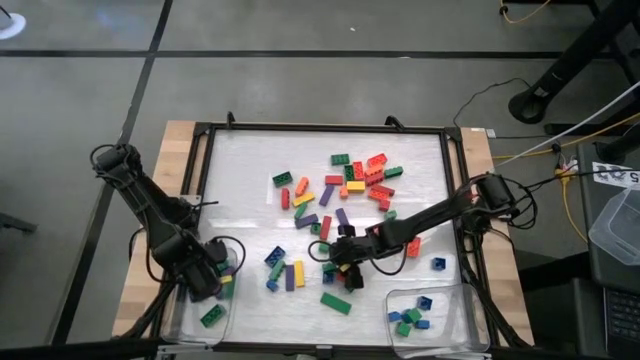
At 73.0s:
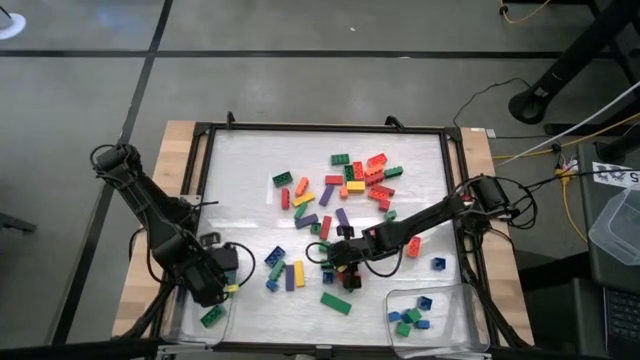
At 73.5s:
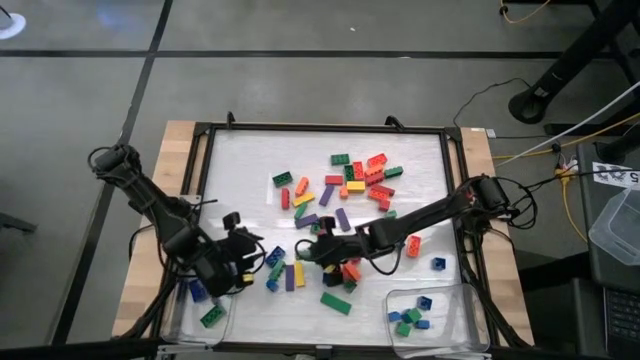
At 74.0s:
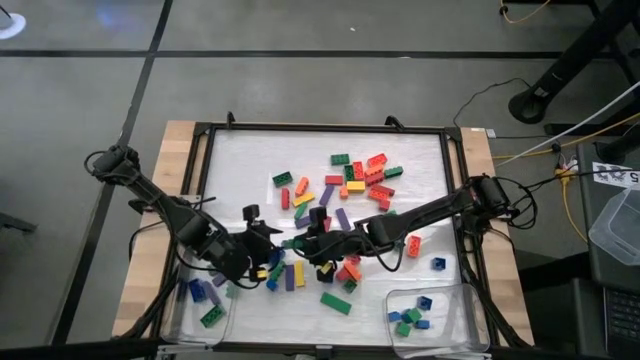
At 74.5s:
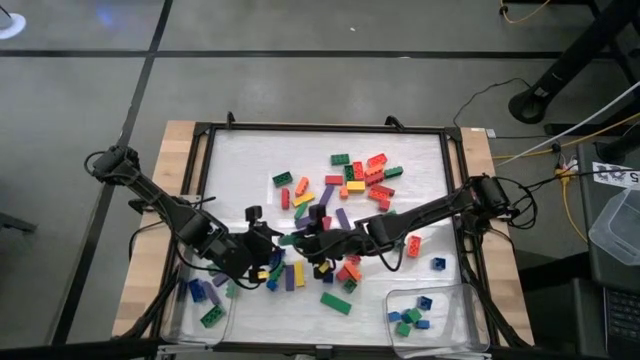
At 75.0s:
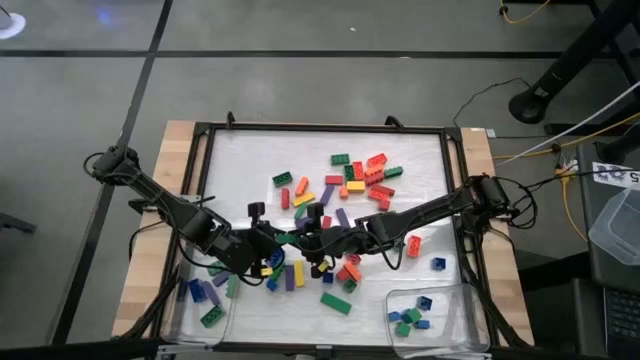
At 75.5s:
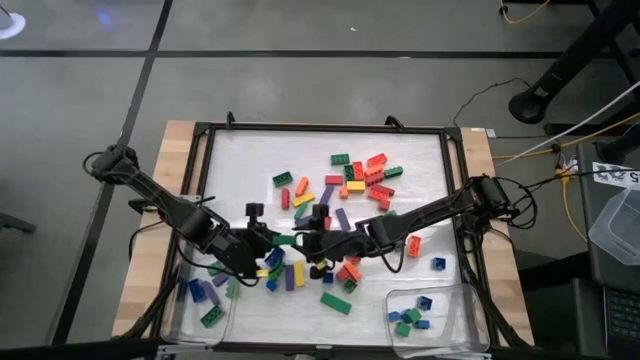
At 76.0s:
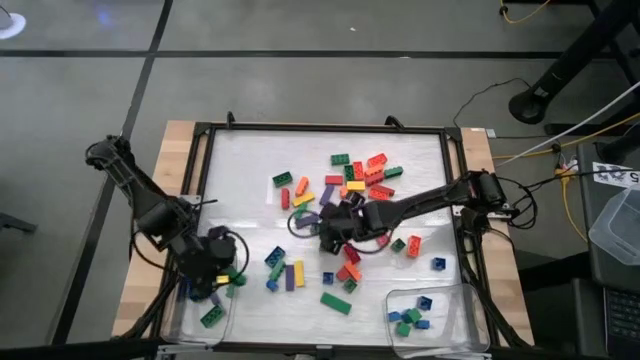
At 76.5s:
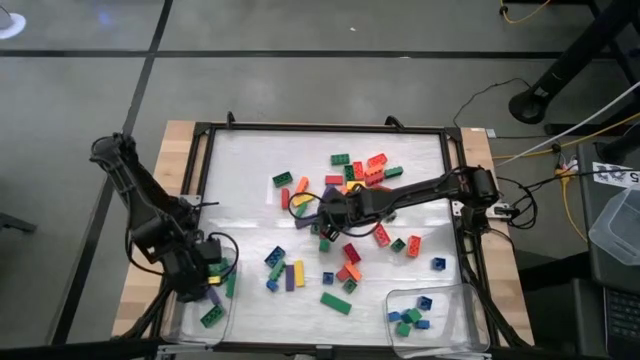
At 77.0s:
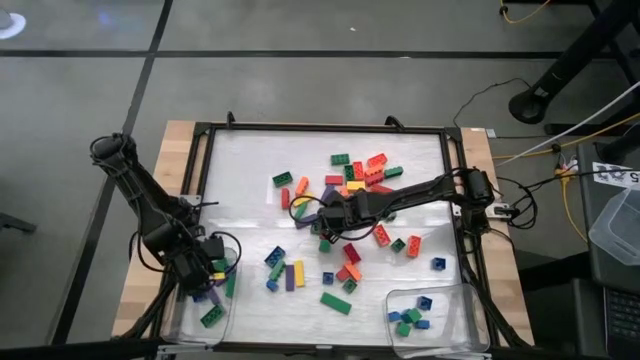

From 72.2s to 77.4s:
Task: Sort blocks by size
Put the large green game piece into the left transparent bin

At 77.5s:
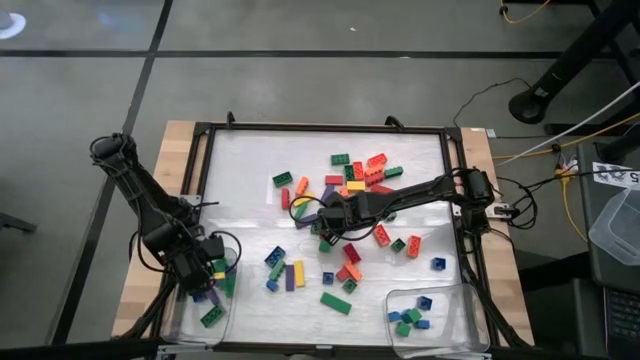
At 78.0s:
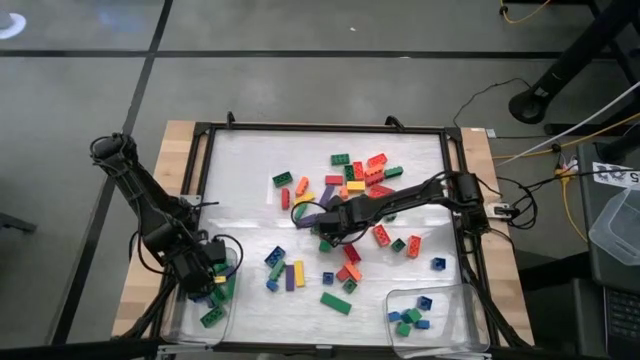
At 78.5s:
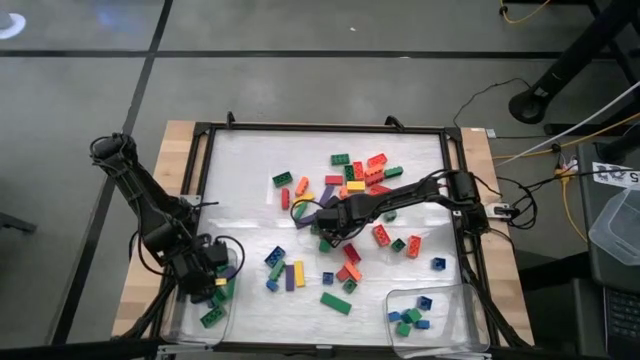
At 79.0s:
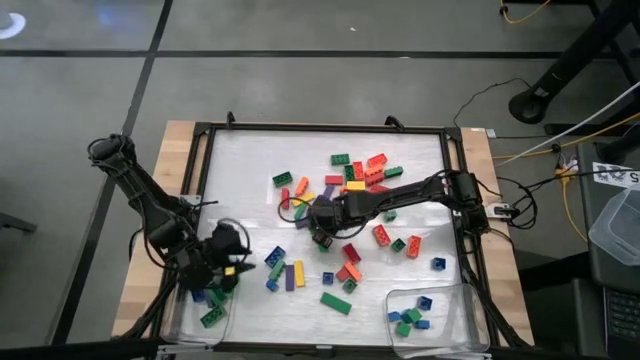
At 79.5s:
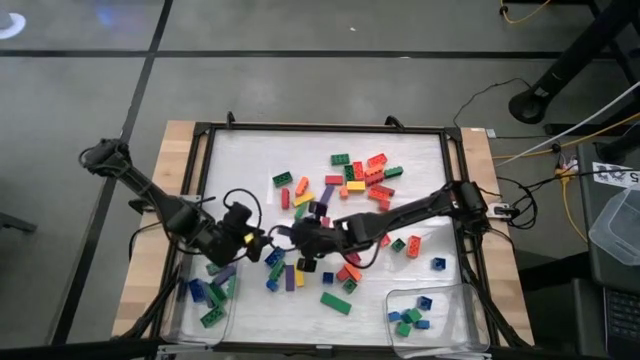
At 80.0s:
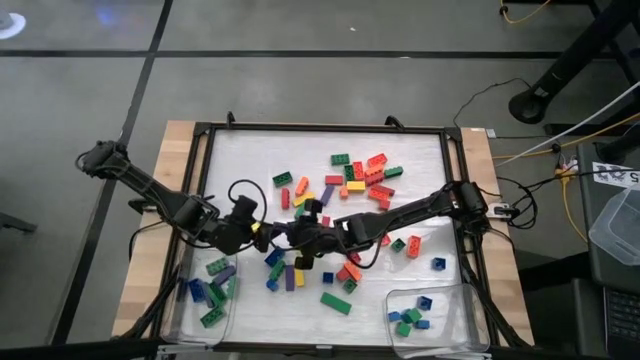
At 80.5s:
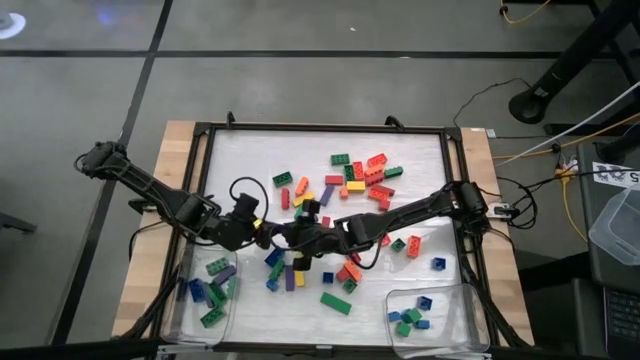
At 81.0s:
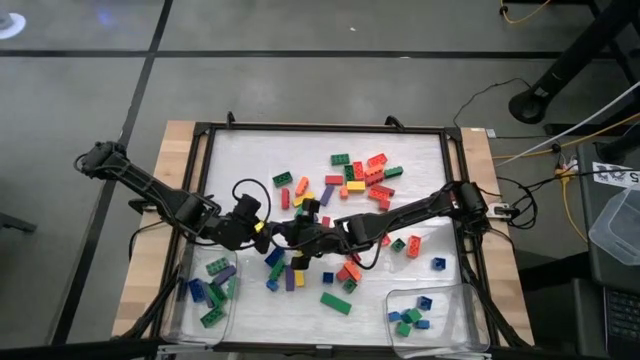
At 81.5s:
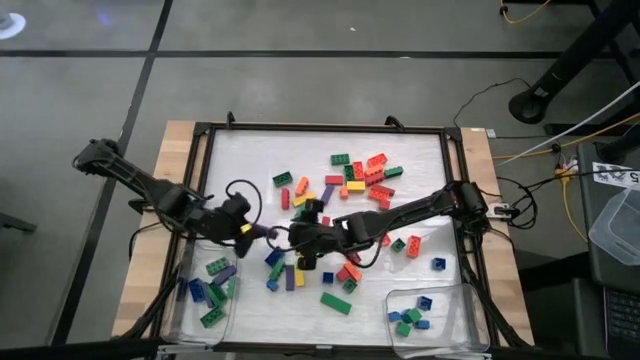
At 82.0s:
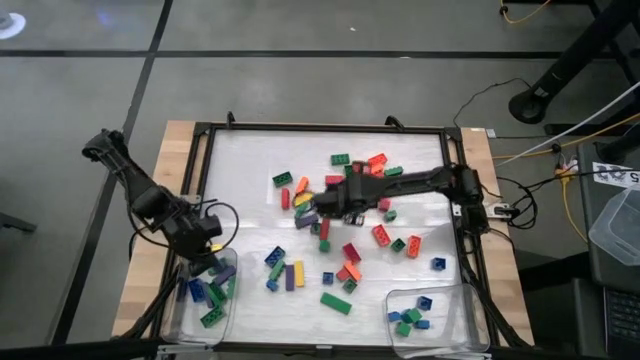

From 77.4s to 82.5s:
Put the large violet block into the left transparent bin

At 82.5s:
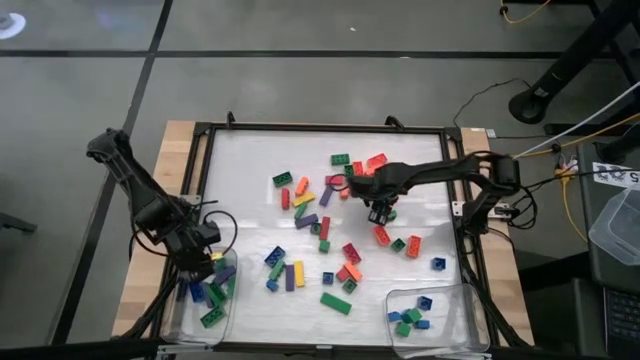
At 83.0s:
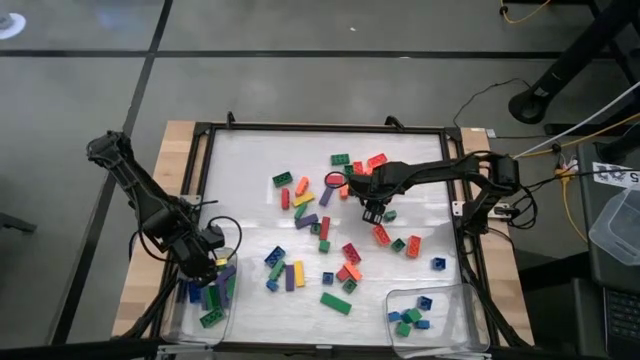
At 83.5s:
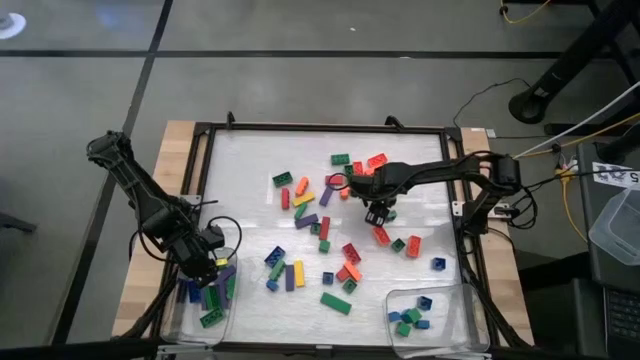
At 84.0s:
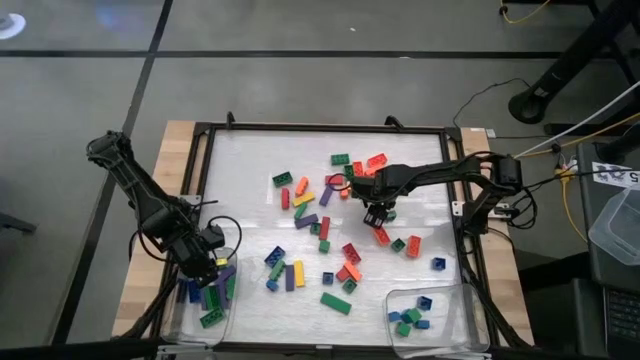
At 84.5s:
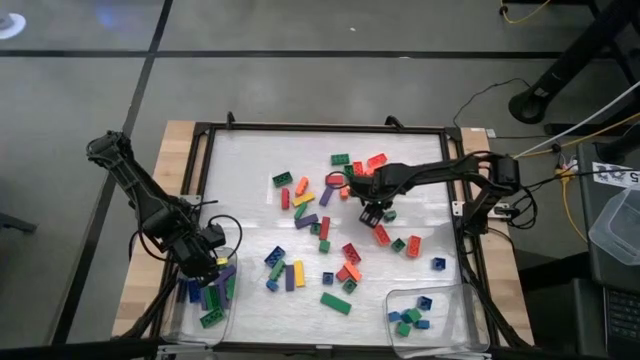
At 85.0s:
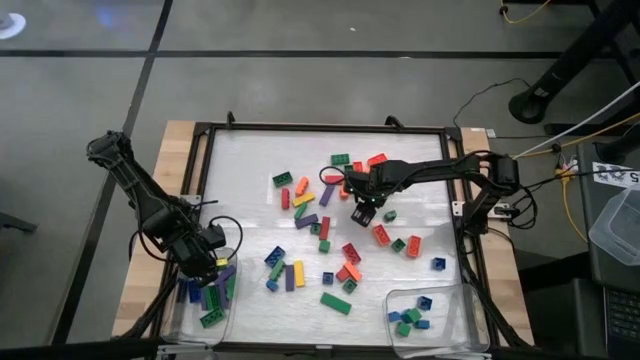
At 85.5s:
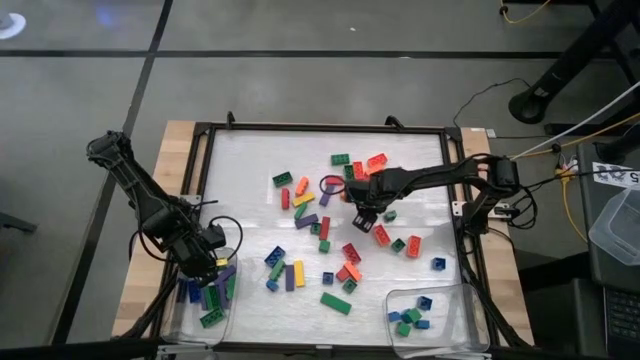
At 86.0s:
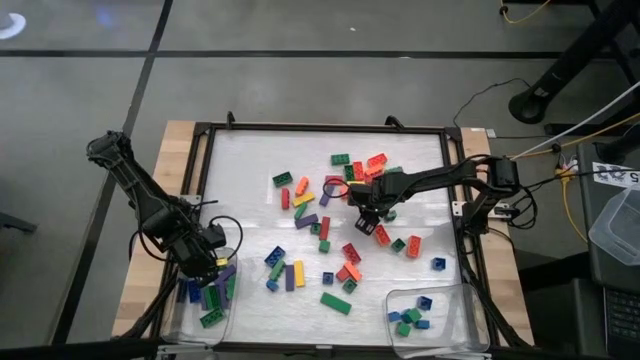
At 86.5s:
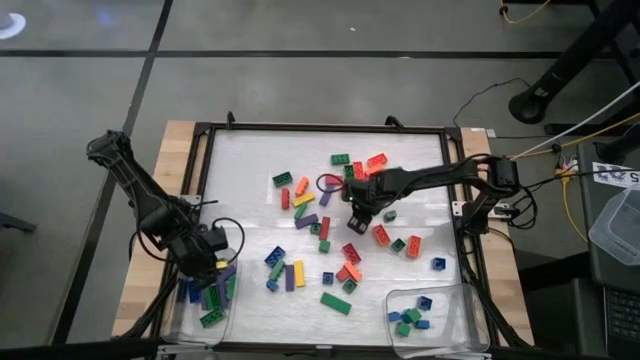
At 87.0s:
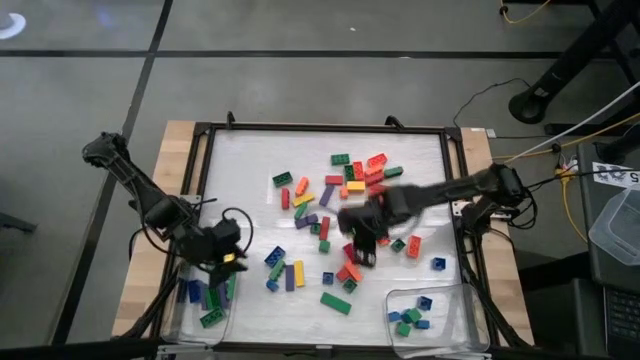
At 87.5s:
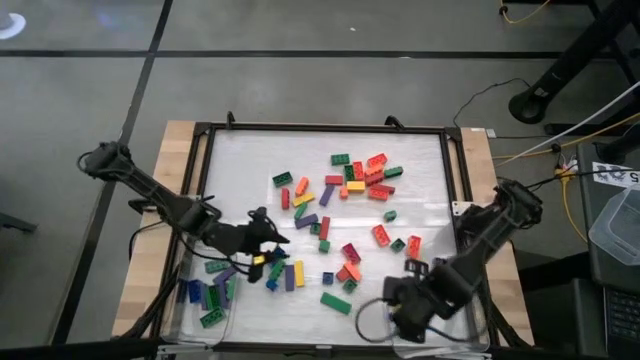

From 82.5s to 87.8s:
Put the small red block into the right transparent bin

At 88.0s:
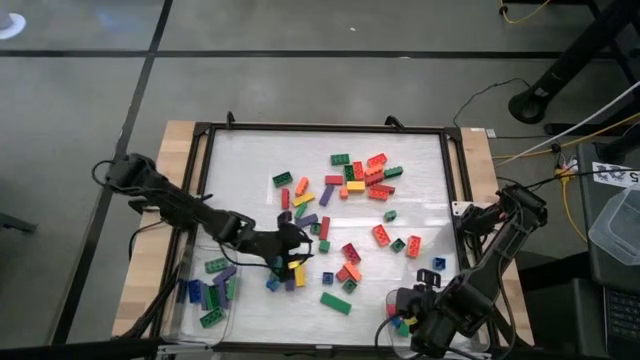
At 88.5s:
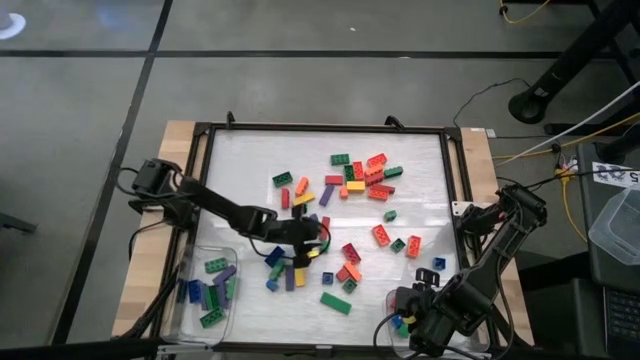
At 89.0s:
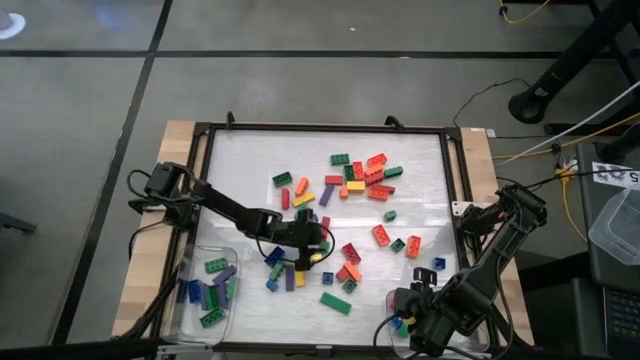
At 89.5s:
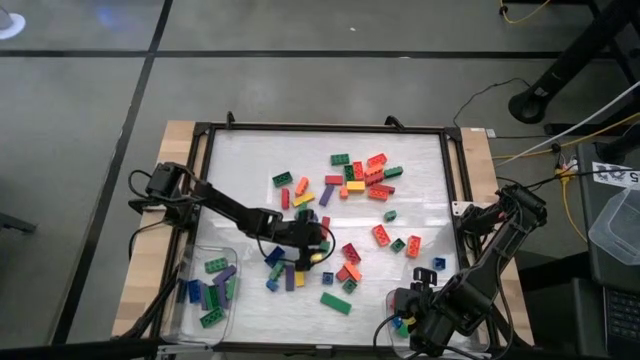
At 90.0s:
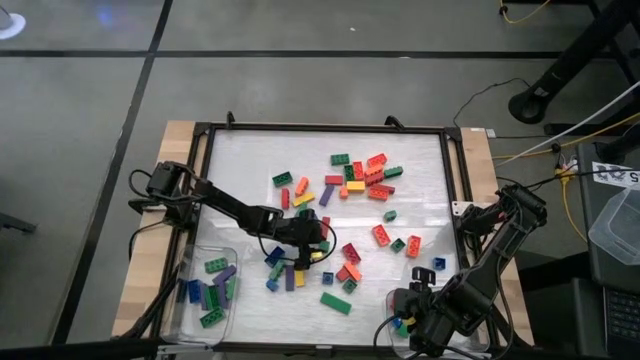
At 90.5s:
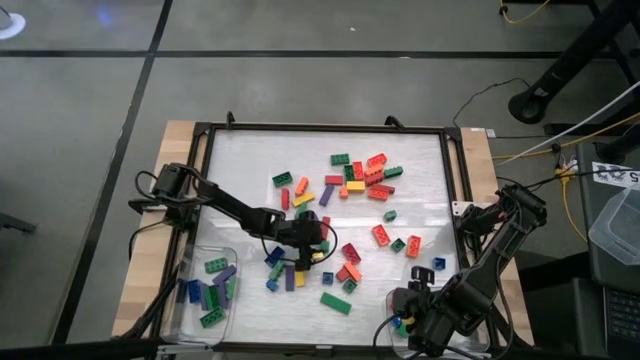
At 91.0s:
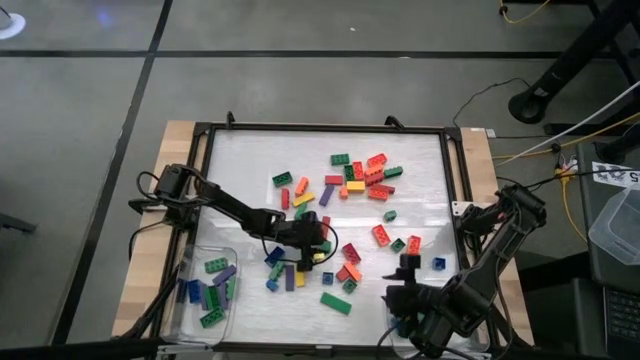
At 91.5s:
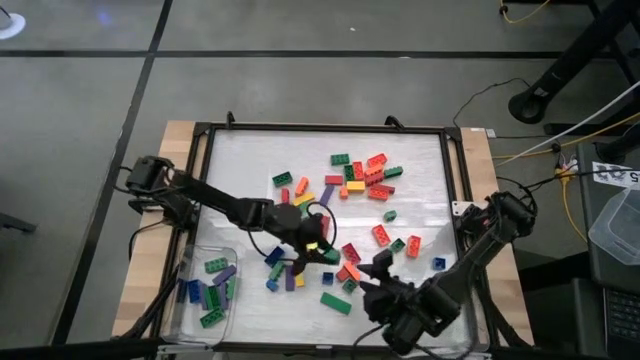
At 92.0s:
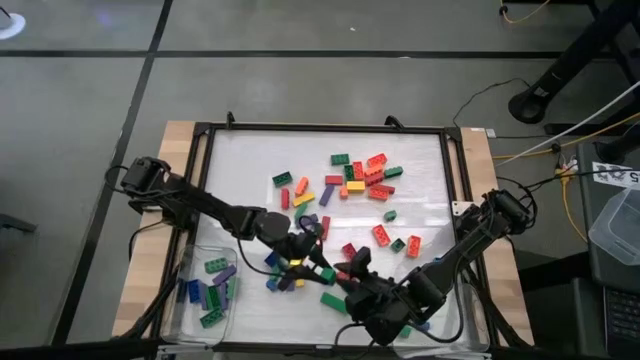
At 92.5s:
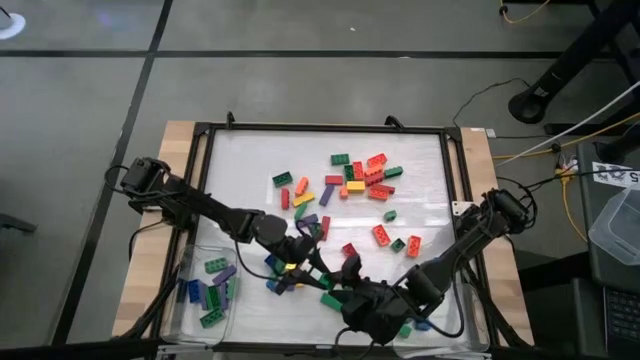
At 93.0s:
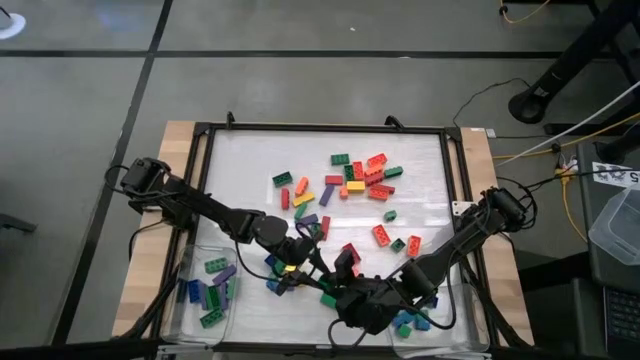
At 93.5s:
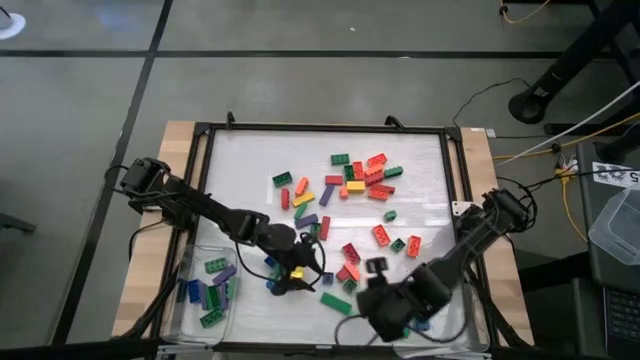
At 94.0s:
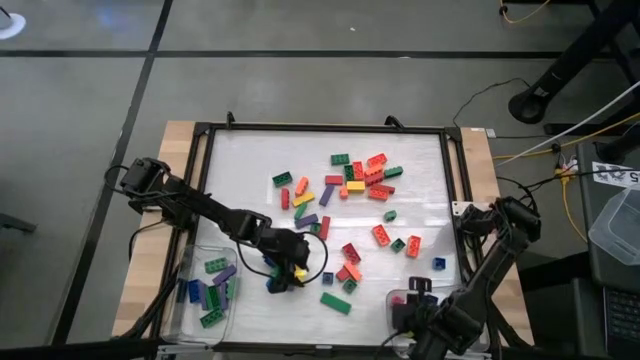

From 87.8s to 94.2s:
Put the small green block into the right transparent bin
